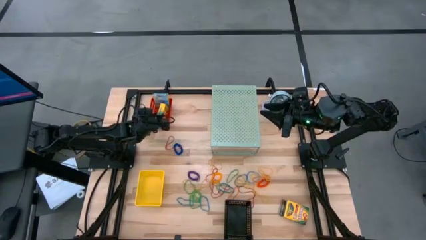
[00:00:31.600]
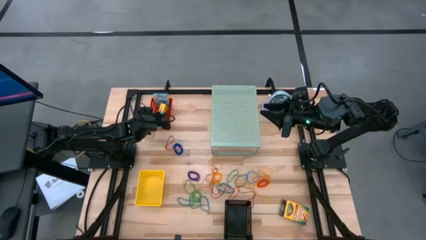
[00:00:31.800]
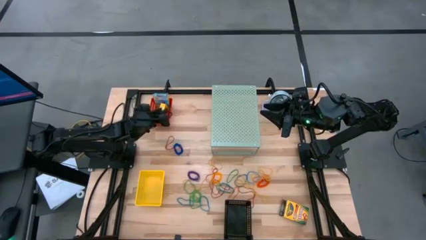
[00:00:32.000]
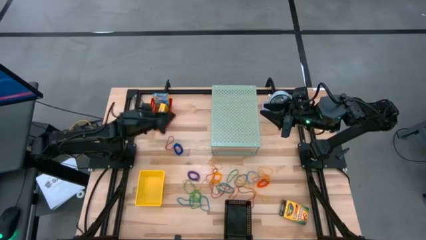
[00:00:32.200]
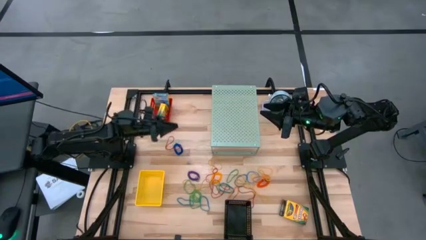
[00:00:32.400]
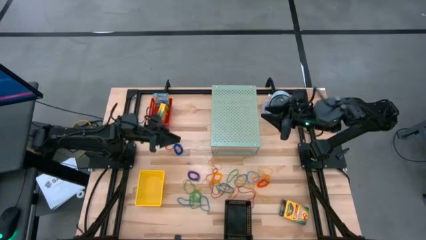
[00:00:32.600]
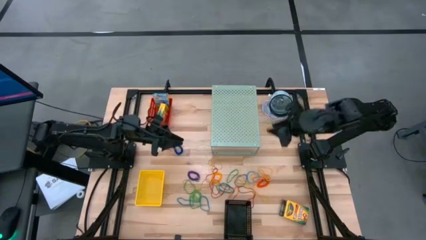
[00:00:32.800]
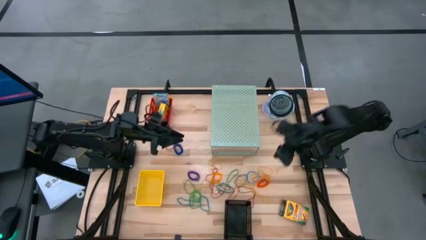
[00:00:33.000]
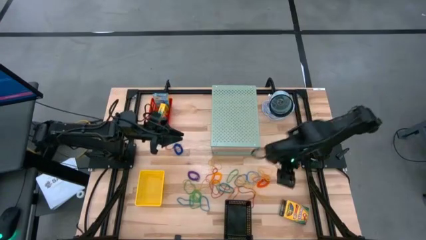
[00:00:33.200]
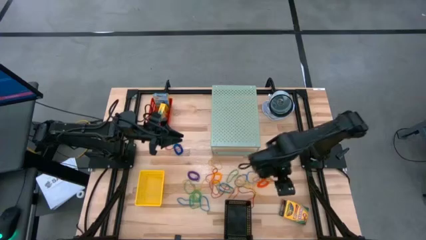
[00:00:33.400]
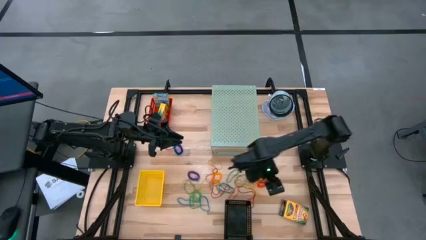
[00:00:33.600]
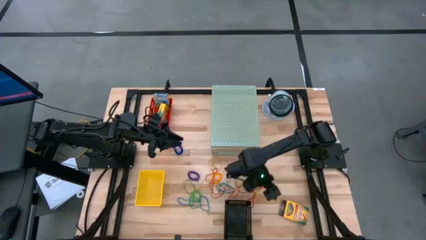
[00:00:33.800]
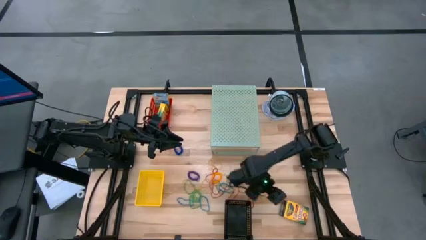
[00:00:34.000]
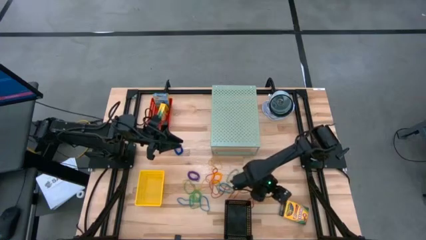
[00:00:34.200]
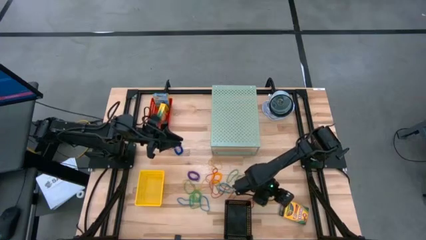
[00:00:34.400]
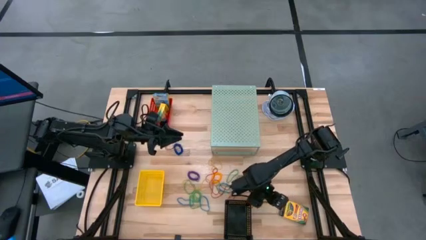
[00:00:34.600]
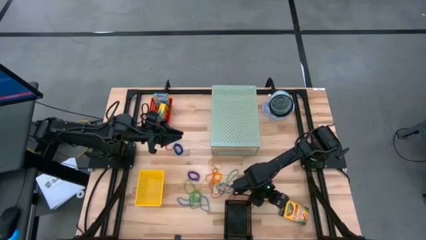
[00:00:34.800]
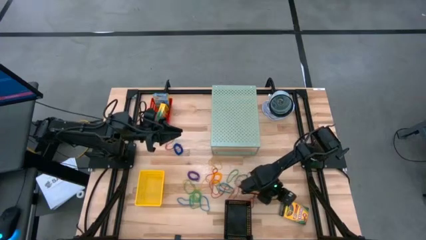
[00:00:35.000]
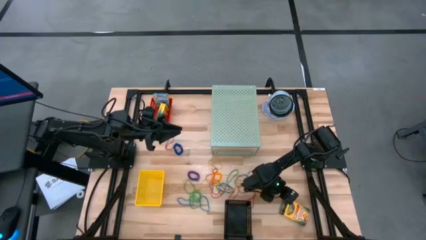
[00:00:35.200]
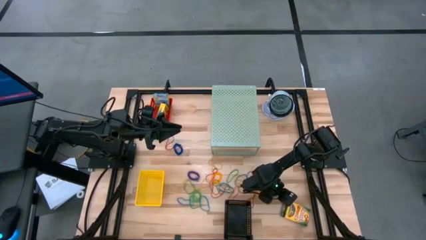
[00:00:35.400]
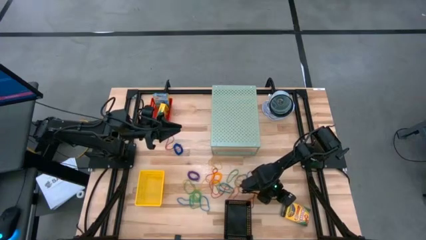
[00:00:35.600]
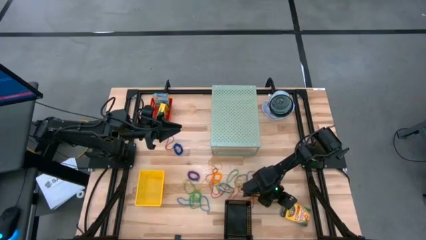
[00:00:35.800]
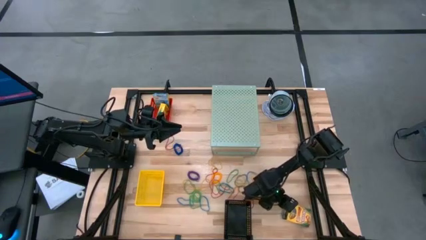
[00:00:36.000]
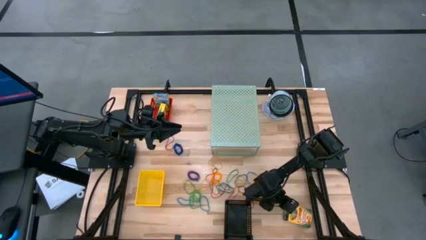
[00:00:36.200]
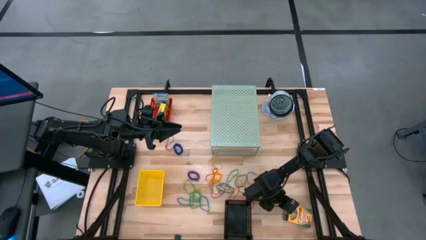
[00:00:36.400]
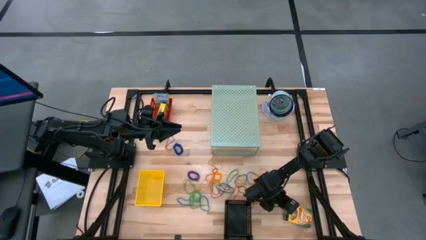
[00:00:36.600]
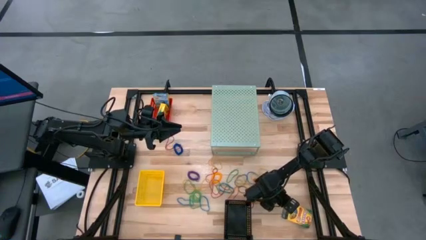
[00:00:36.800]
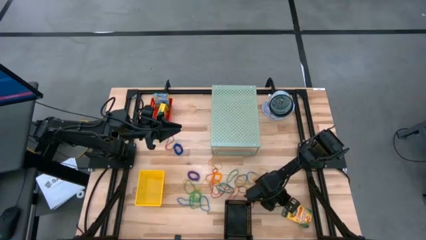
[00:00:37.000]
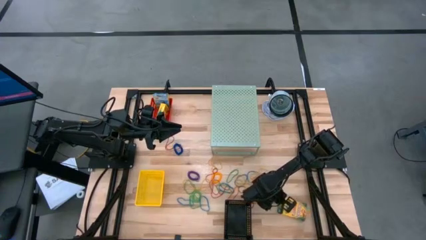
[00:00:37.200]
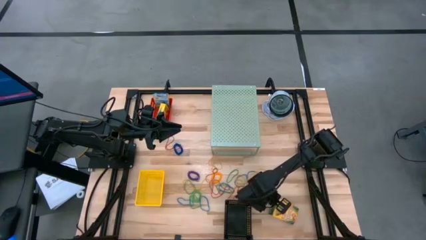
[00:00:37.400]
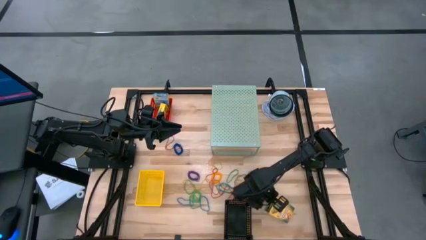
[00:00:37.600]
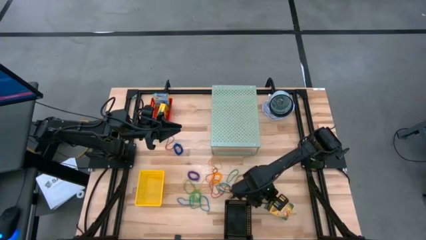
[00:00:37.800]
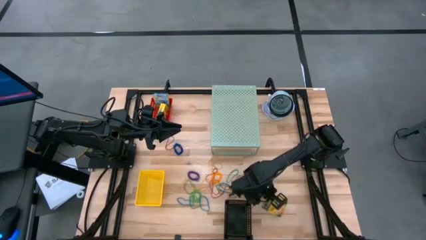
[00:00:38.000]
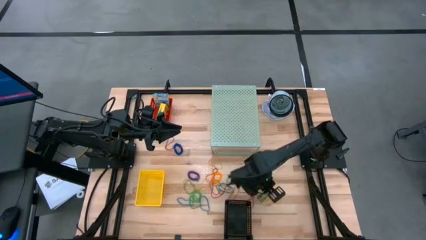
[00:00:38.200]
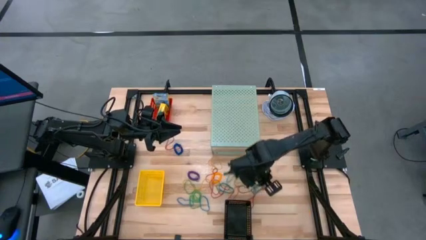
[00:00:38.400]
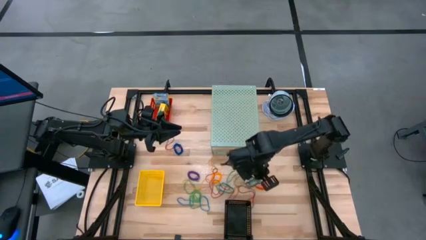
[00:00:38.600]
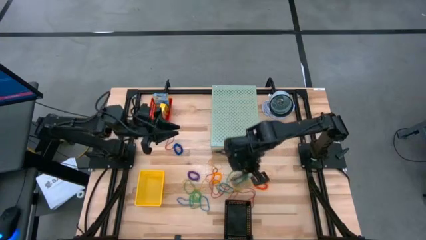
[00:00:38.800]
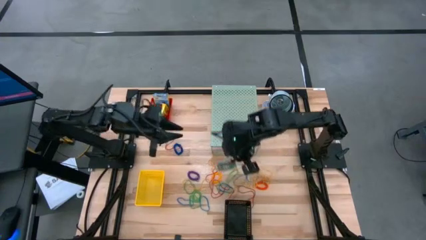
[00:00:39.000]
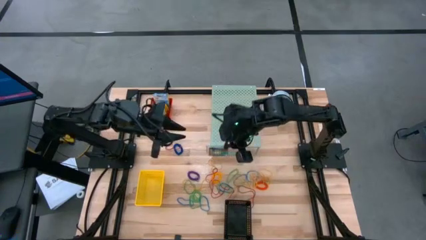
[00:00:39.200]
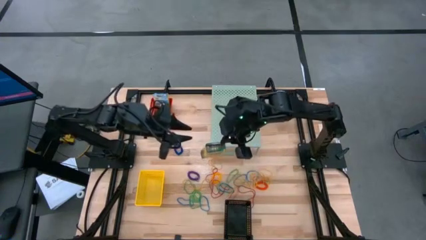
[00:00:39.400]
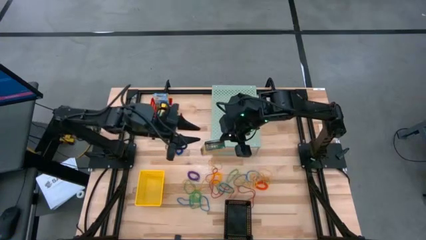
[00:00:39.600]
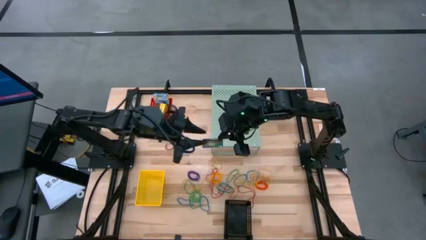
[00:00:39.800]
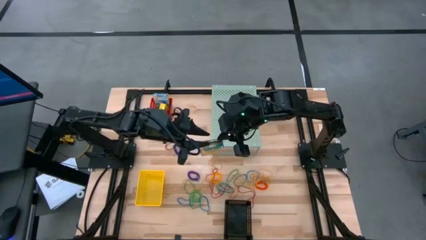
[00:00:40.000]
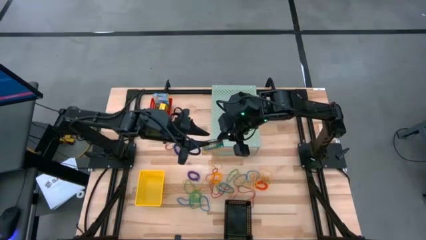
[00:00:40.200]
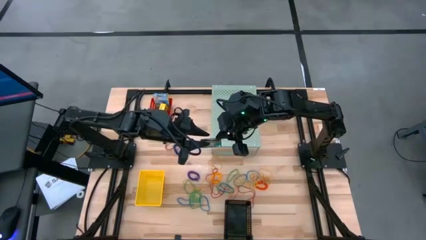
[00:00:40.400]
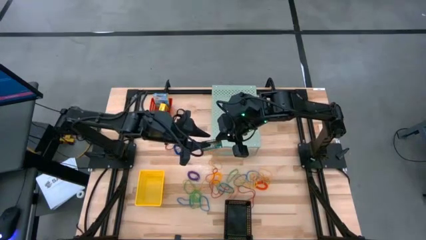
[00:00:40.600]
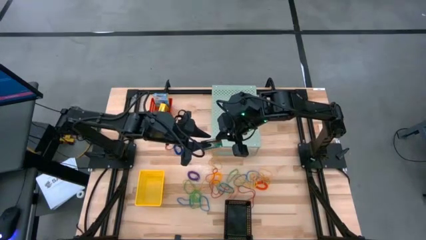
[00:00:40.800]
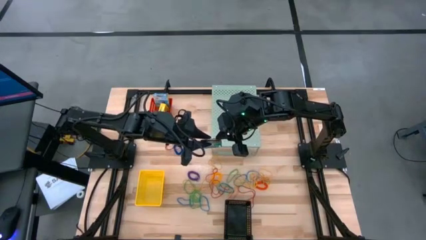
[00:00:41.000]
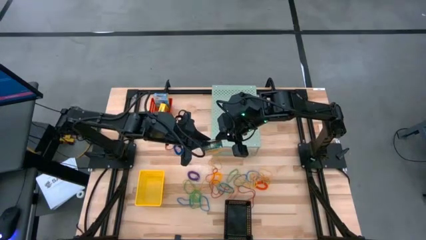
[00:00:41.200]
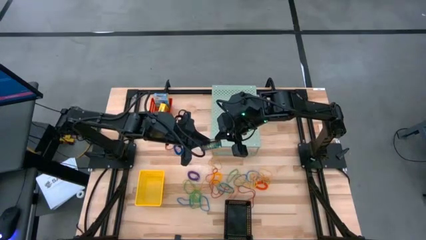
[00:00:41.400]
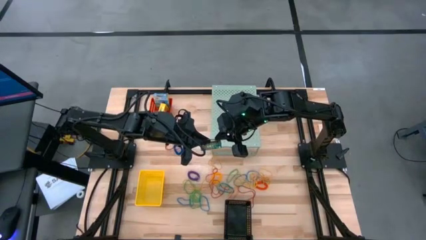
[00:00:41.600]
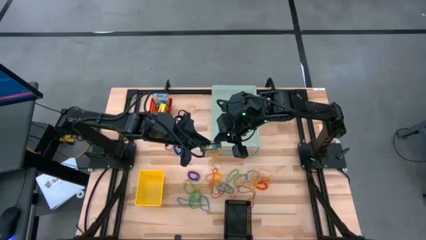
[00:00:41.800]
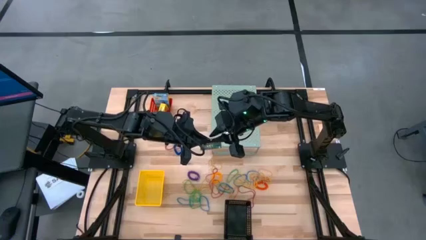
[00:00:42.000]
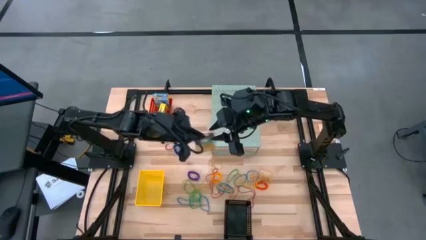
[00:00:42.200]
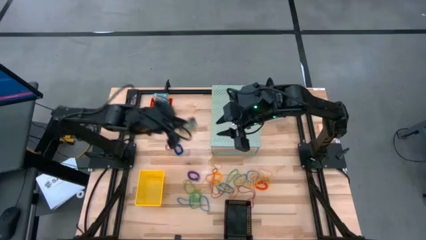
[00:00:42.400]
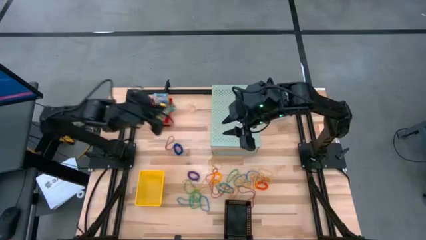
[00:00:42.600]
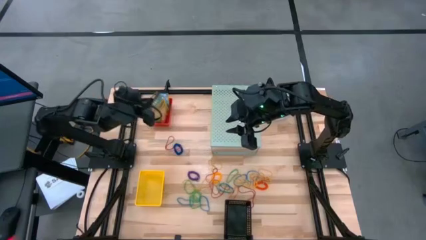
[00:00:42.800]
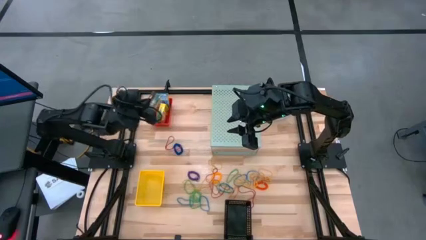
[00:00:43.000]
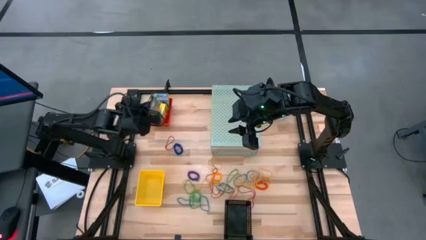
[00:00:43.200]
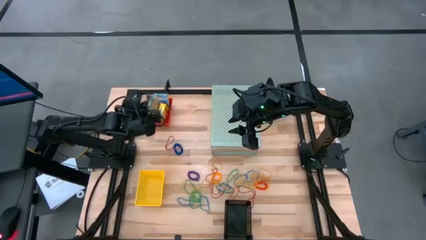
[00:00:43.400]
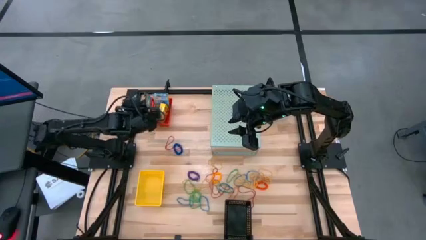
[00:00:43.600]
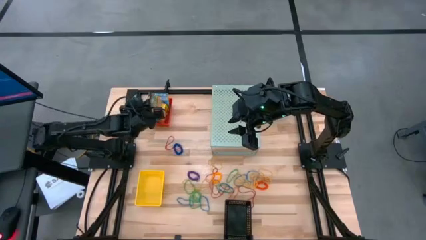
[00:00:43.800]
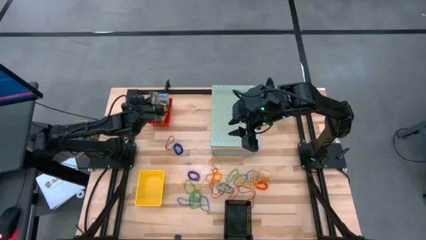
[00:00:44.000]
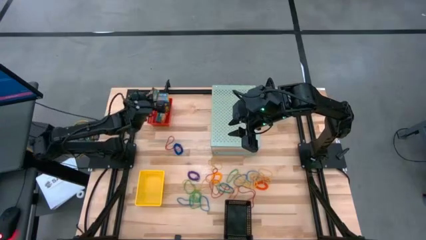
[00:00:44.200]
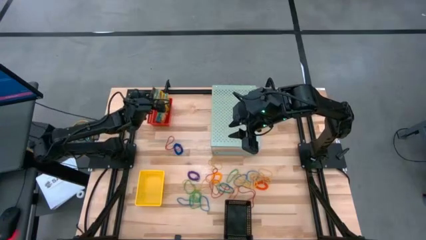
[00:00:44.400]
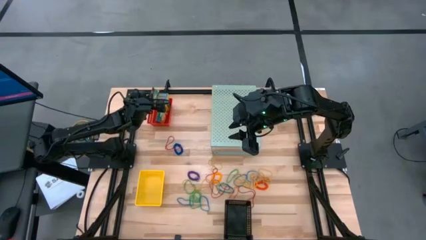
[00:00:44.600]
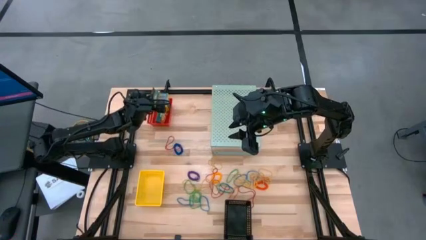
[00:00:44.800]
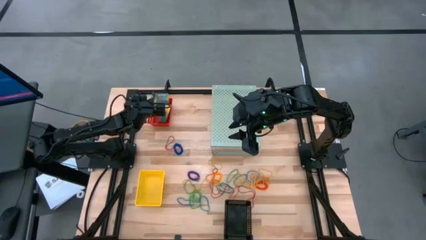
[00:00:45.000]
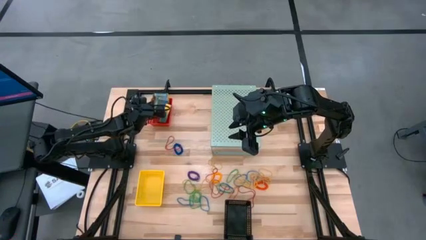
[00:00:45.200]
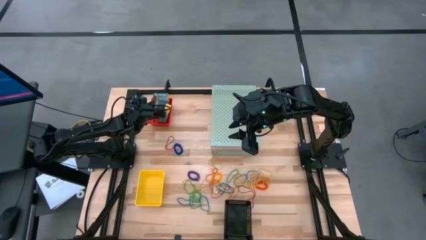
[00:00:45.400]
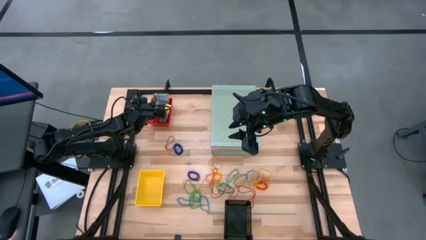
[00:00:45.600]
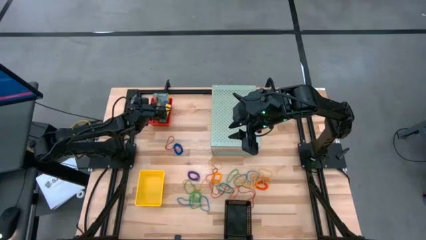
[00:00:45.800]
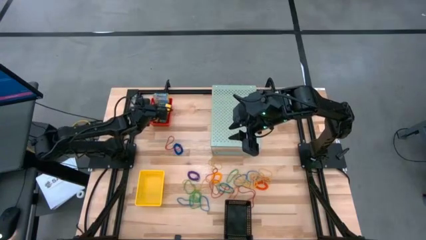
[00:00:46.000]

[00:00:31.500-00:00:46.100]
Task: Pick & Place Office Desk Supplies
Put the crayon box into the red bin
